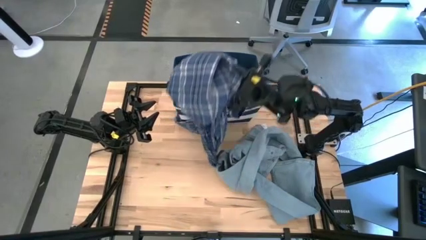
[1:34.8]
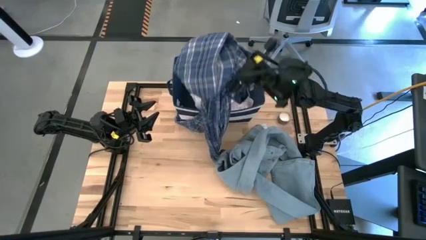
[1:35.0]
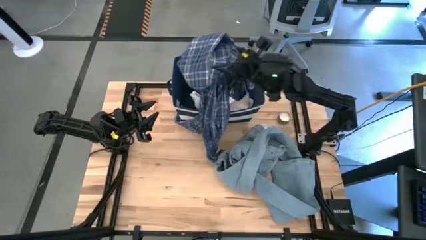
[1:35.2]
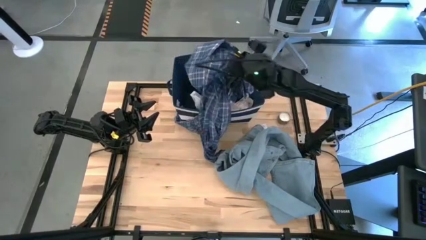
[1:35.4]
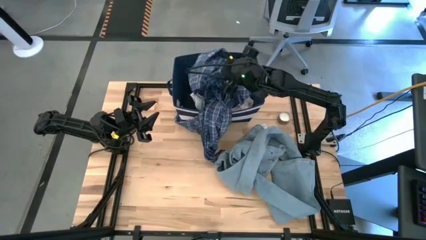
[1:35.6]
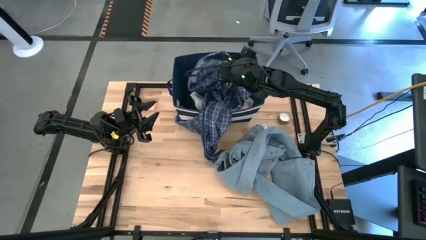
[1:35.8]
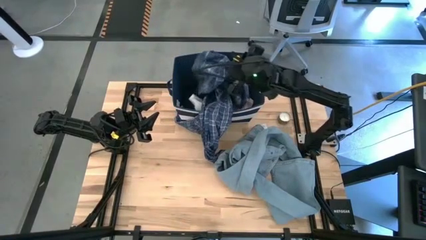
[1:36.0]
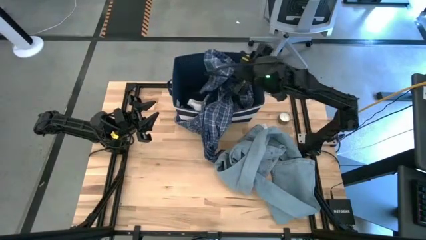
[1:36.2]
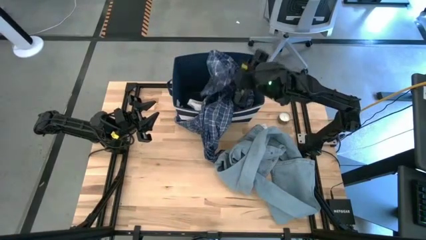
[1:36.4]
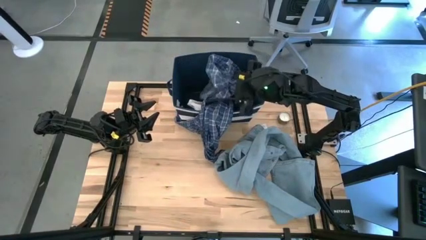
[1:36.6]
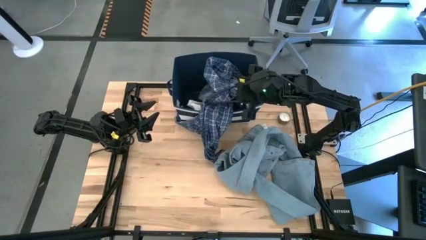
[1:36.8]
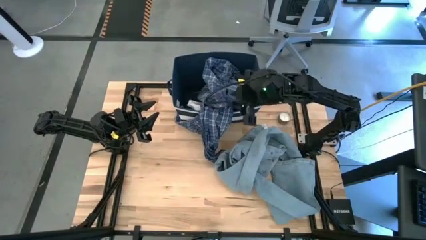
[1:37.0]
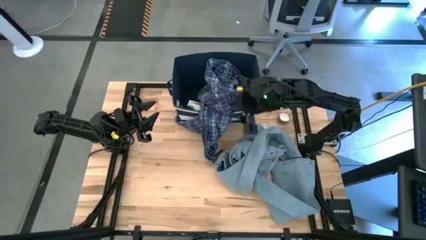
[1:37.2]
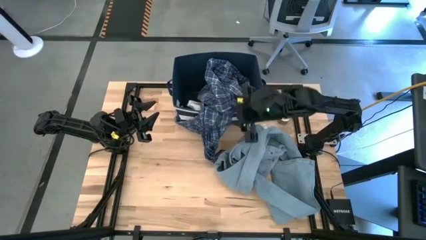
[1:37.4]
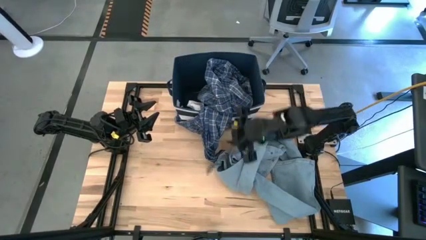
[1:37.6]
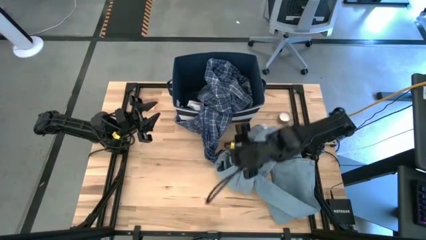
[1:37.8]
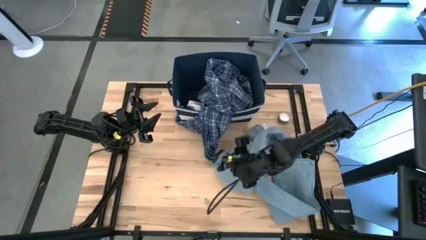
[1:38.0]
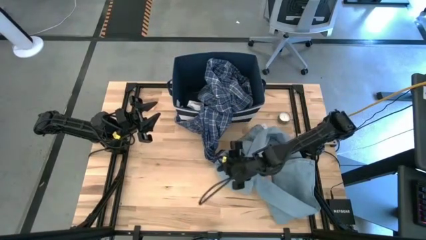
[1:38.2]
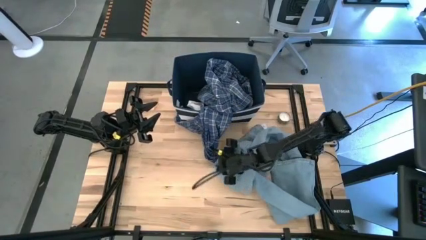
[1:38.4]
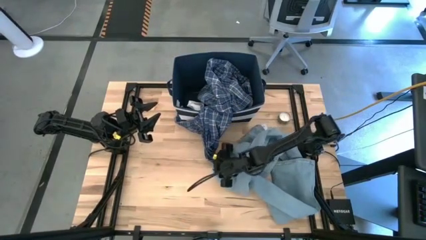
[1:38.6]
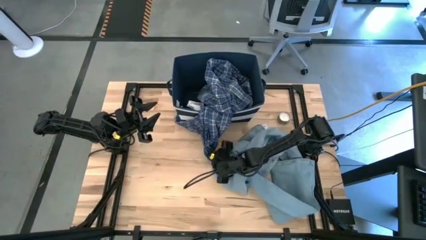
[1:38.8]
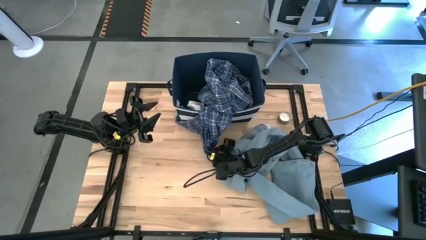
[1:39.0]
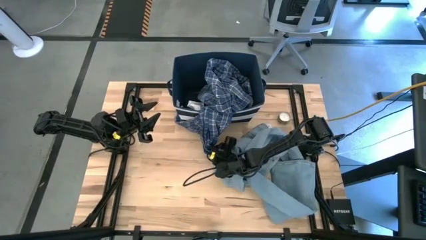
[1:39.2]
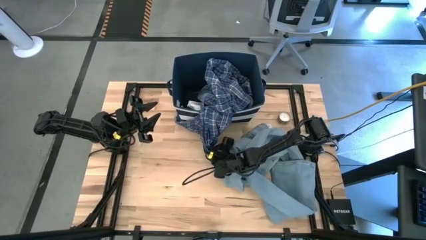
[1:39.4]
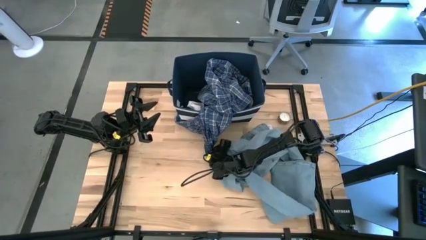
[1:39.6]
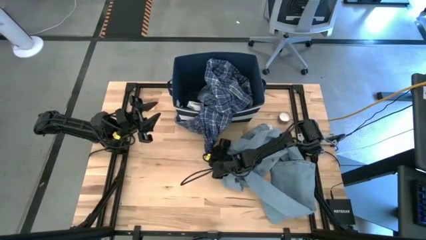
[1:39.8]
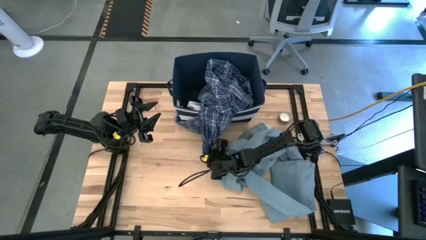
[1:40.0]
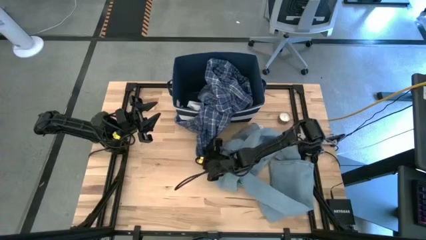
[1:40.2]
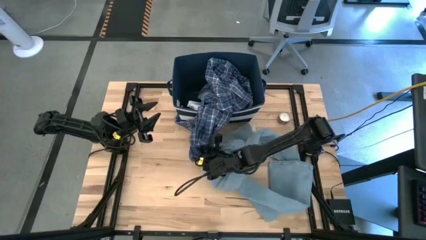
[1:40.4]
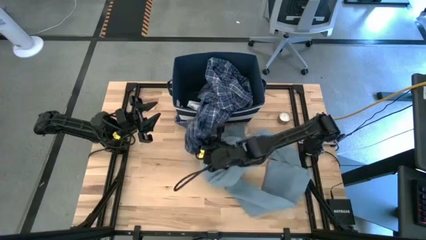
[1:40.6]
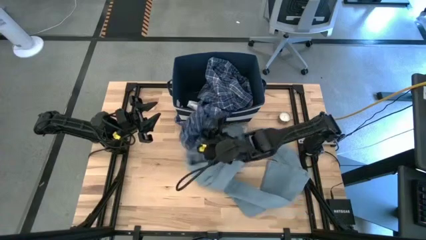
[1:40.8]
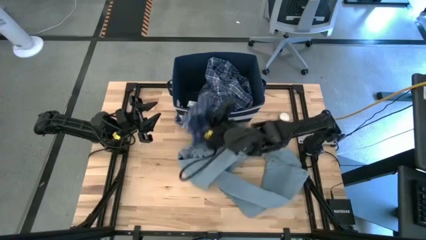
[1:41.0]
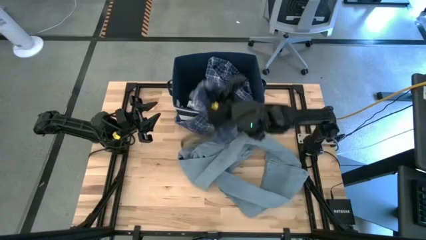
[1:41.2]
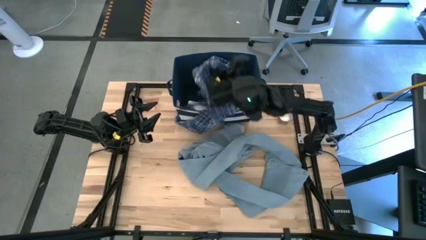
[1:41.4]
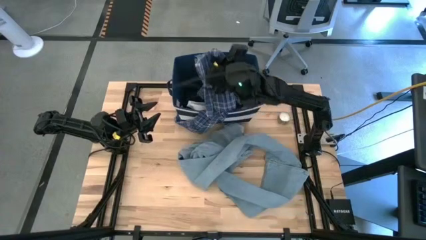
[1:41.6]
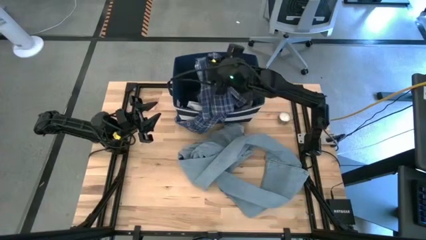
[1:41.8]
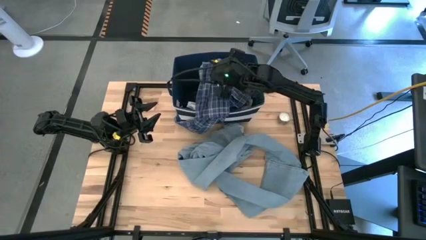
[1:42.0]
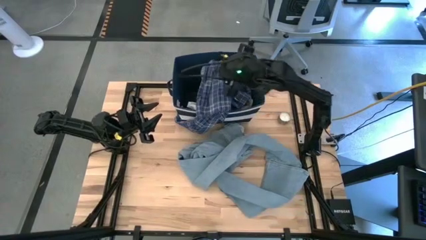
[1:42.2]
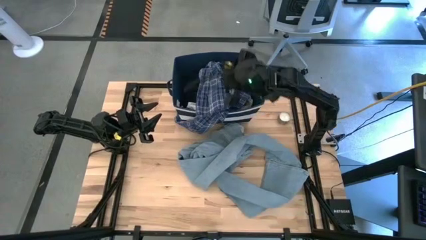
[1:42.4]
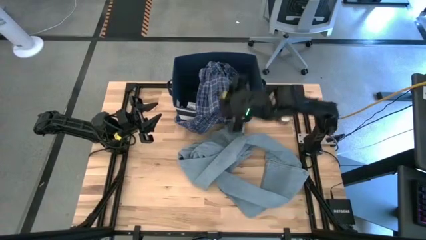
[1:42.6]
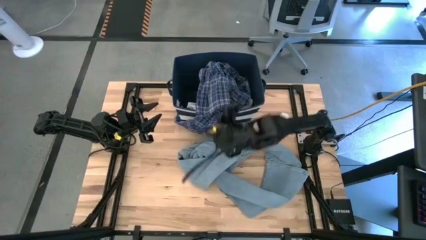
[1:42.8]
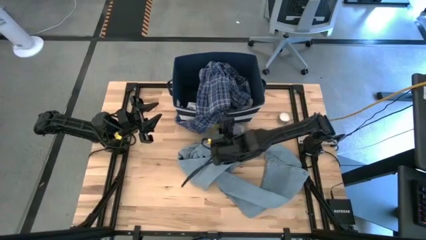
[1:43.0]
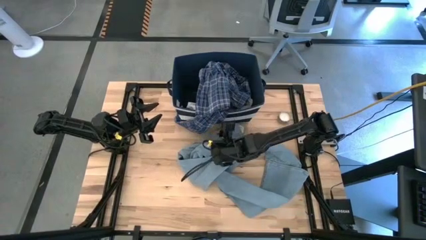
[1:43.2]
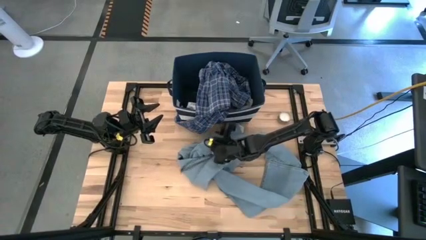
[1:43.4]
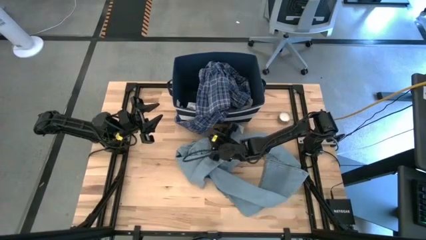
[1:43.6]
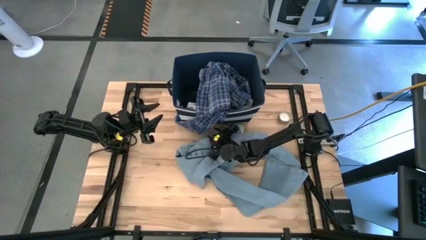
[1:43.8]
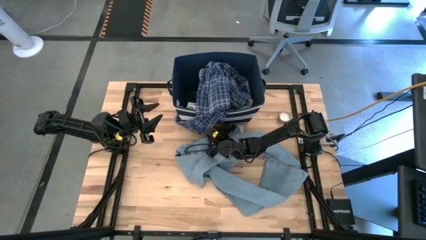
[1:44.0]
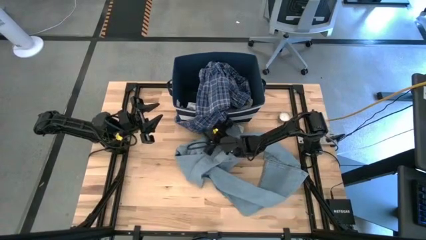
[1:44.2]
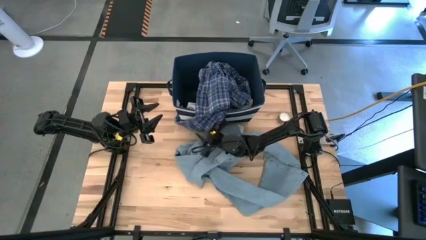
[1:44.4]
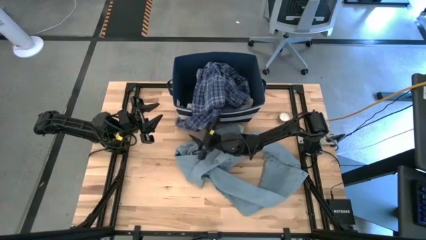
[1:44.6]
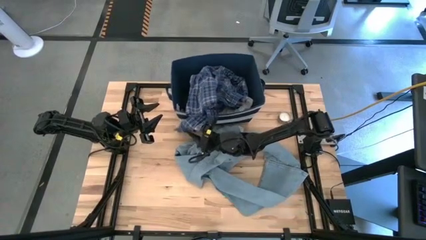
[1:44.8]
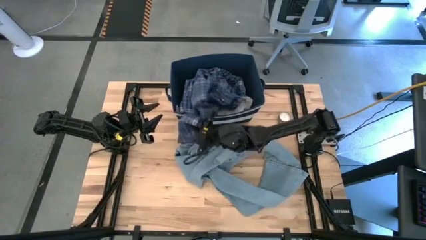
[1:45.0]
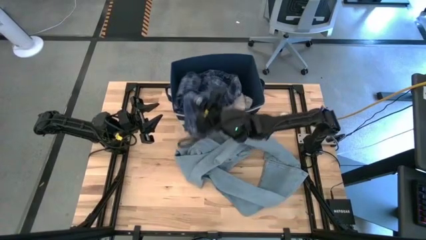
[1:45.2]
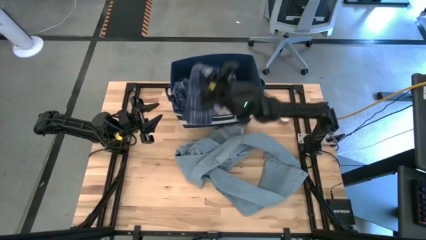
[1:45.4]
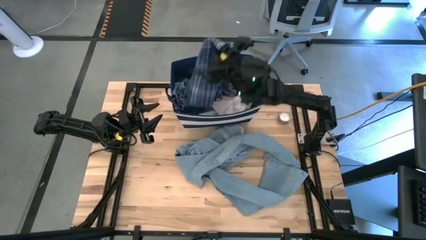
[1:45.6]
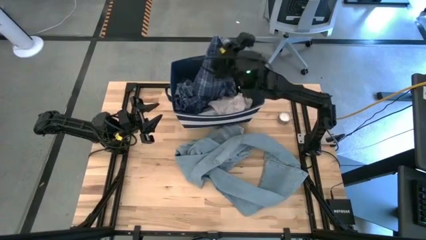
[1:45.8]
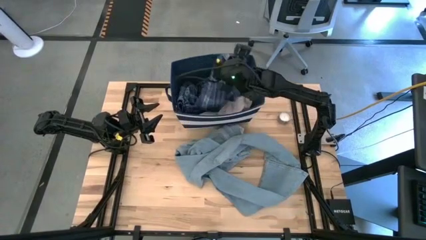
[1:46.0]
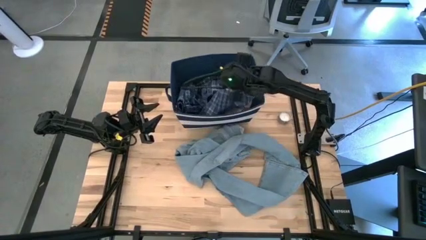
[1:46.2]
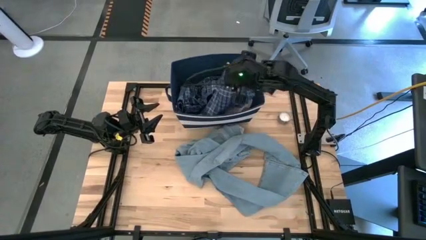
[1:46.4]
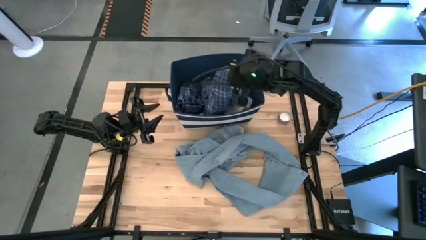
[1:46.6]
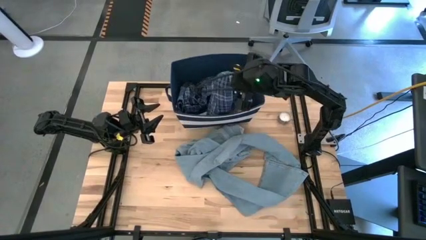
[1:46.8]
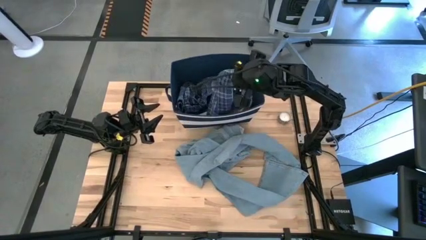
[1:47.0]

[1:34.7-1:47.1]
Task: Sort clothes
Put the blue long sleeve shirt into the blue laundry bin

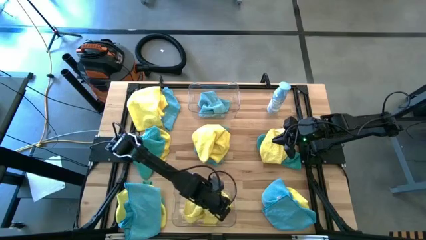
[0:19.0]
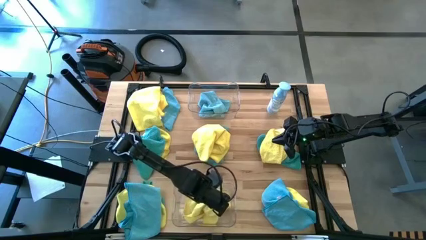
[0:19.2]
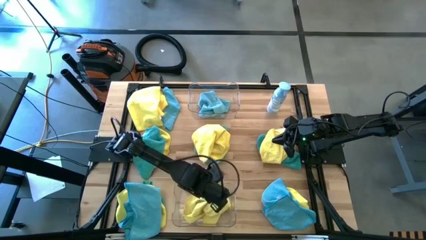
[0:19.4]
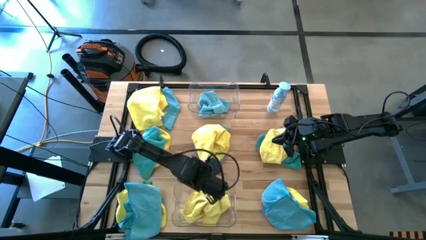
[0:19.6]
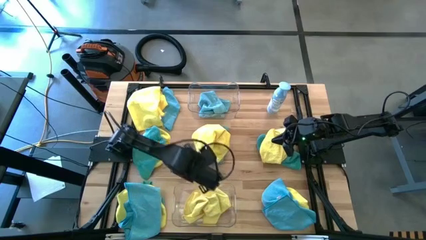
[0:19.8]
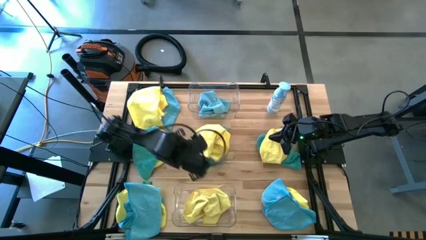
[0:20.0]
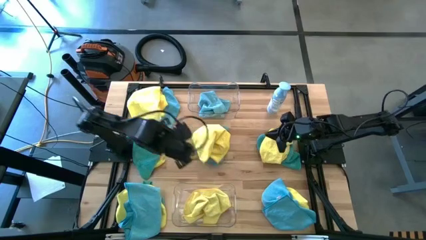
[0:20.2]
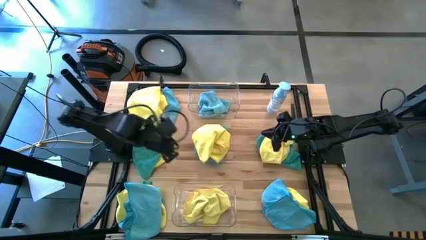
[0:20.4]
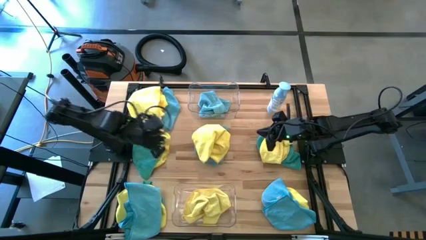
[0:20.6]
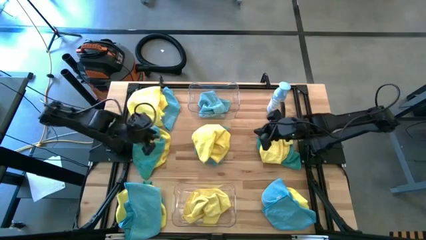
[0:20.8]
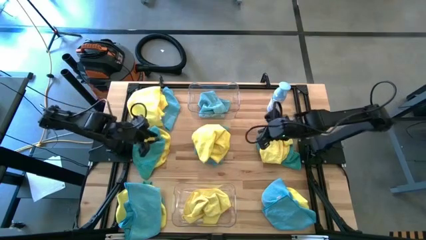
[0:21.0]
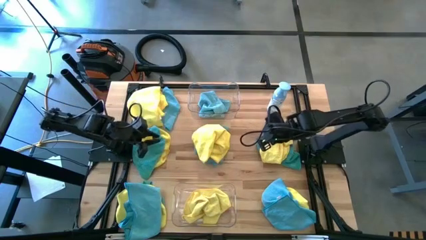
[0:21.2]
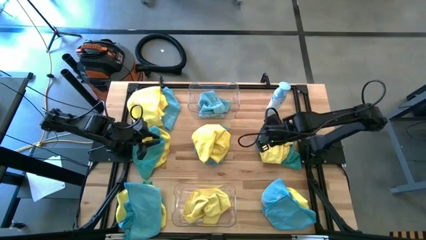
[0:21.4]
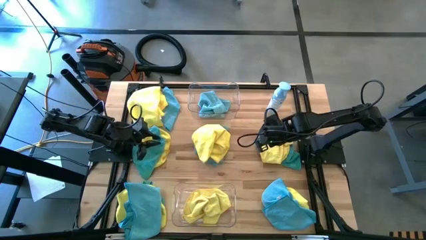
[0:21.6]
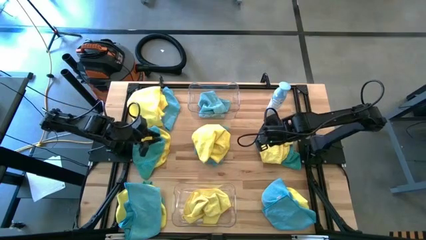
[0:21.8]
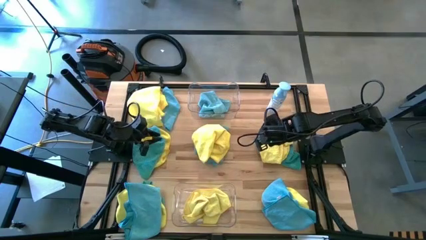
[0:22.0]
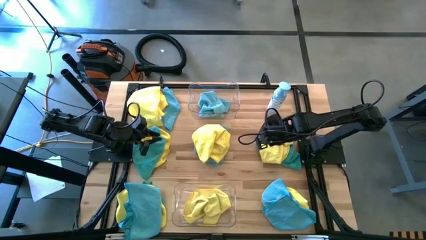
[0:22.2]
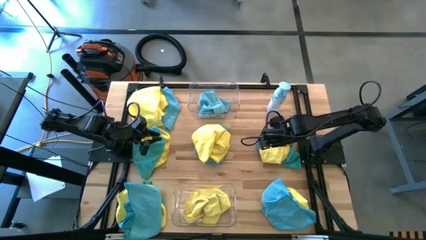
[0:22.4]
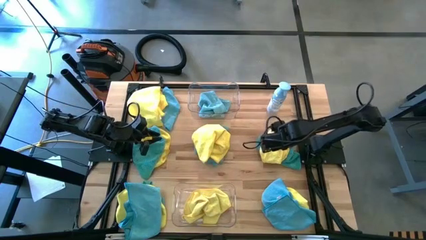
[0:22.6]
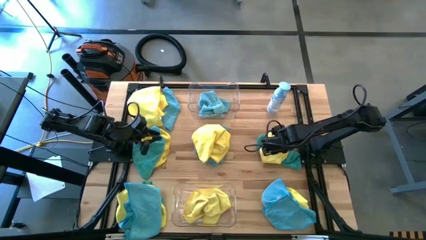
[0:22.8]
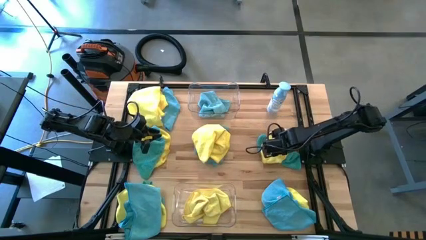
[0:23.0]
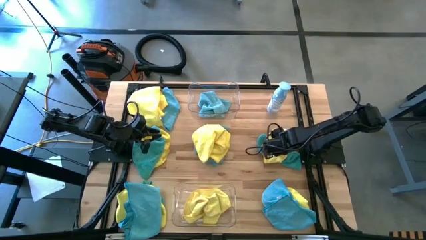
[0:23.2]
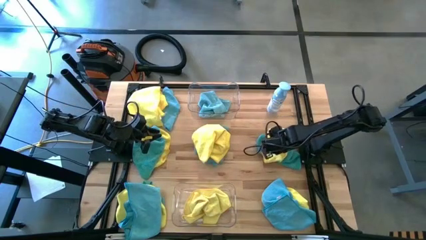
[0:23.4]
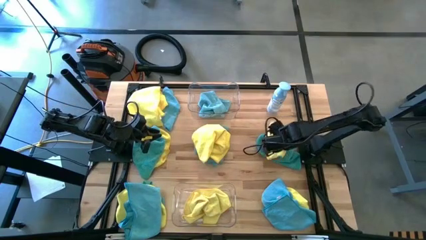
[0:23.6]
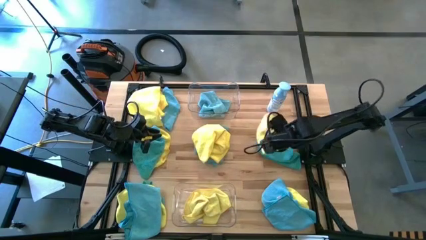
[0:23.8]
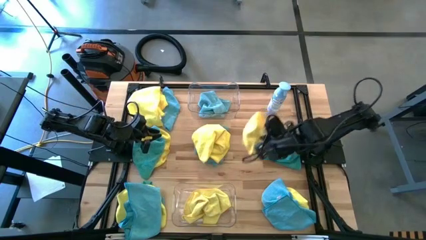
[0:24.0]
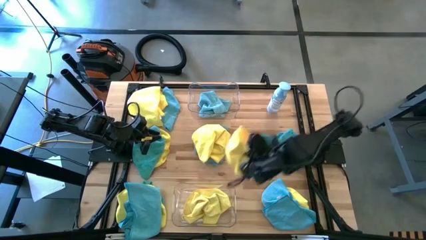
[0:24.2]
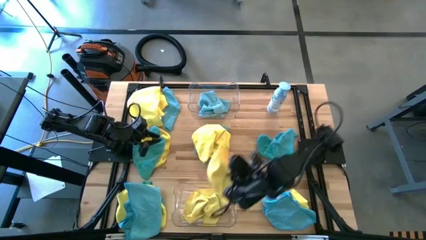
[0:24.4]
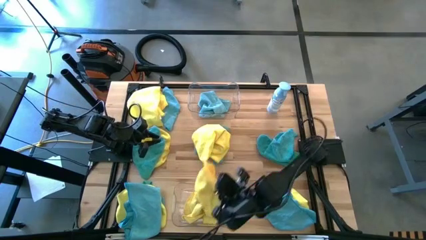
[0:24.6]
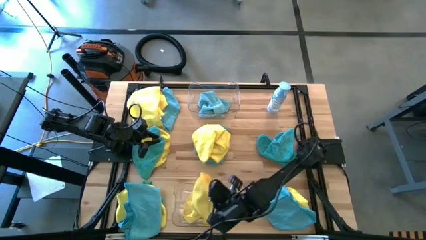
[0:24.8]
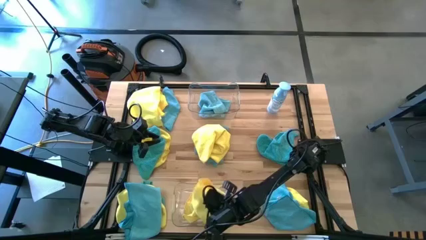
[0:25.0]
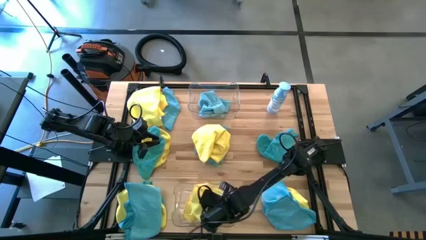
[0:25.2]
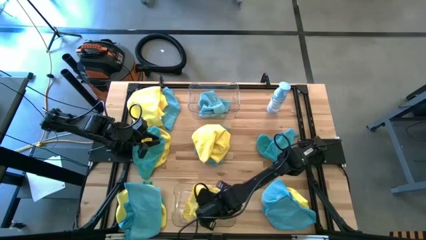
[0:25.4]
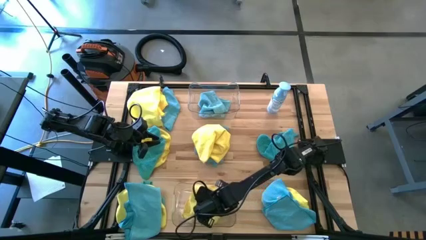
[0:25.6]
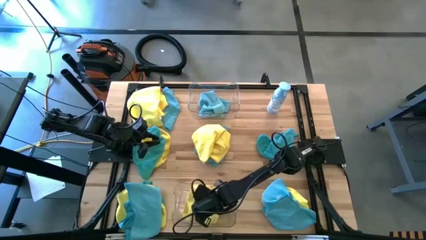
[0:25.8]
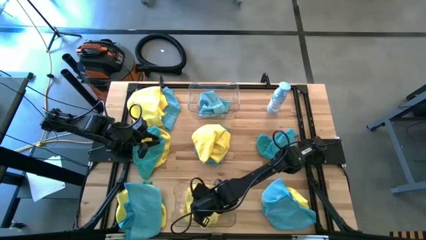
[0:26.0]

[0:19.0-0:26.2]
Task: Sort microfiber towel by color & place in baskets
Put the yellow microfiber towel into the bottom transparent bin
